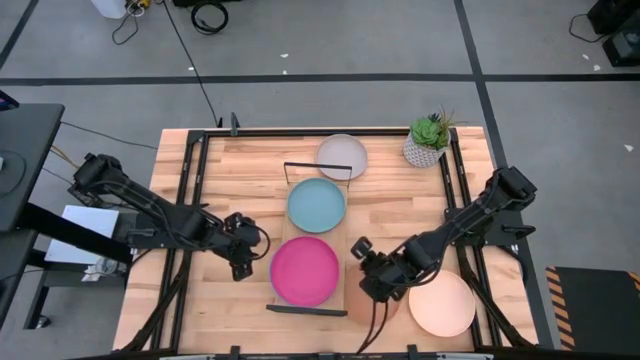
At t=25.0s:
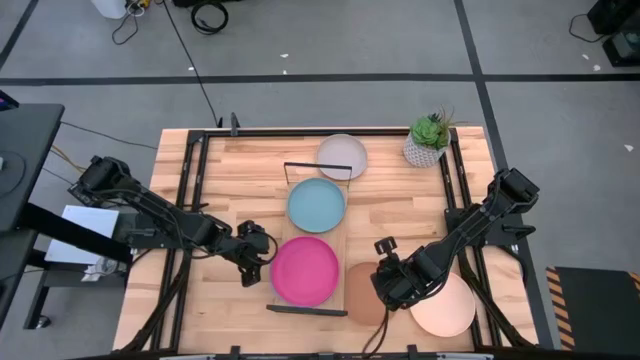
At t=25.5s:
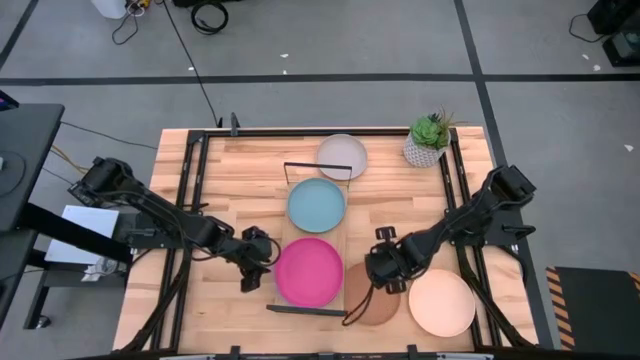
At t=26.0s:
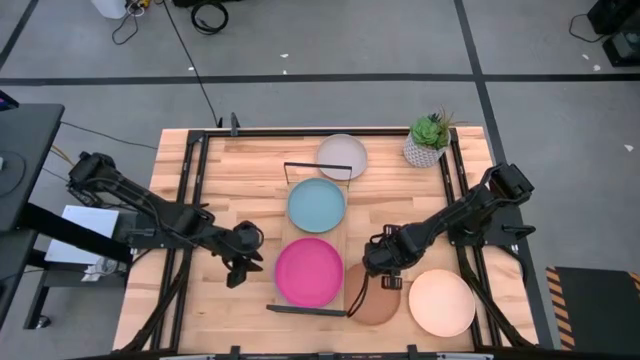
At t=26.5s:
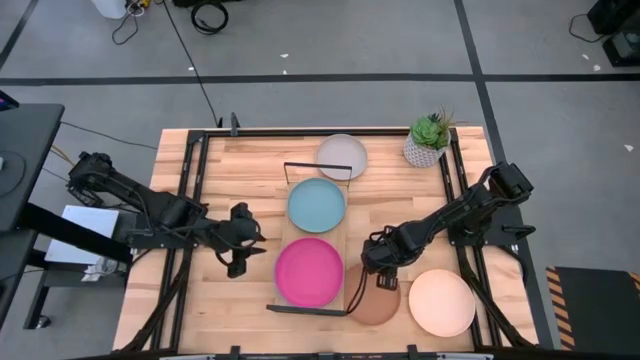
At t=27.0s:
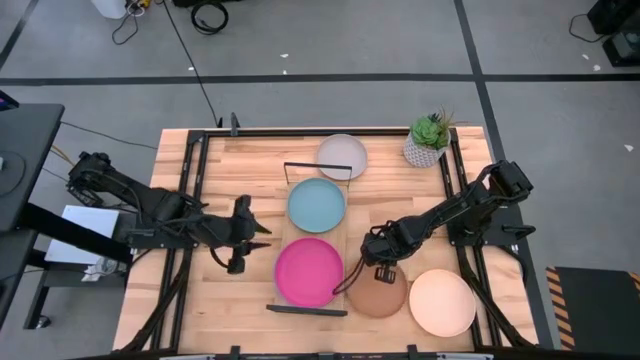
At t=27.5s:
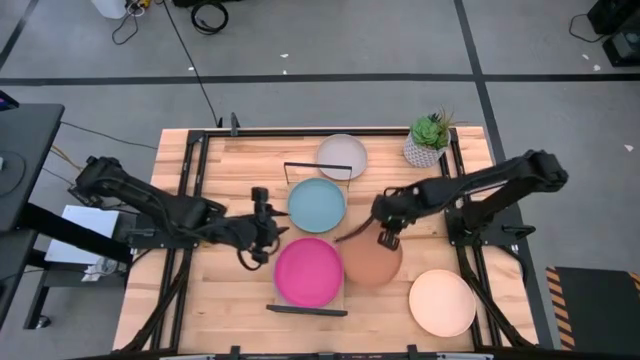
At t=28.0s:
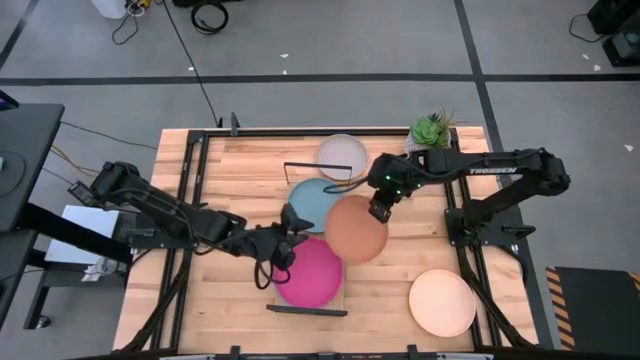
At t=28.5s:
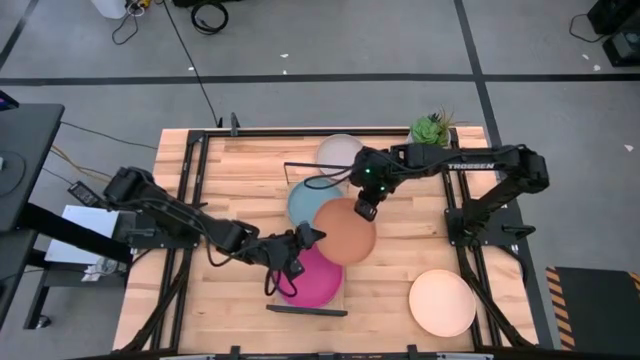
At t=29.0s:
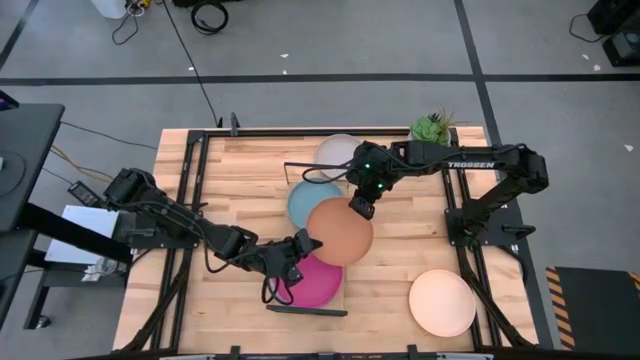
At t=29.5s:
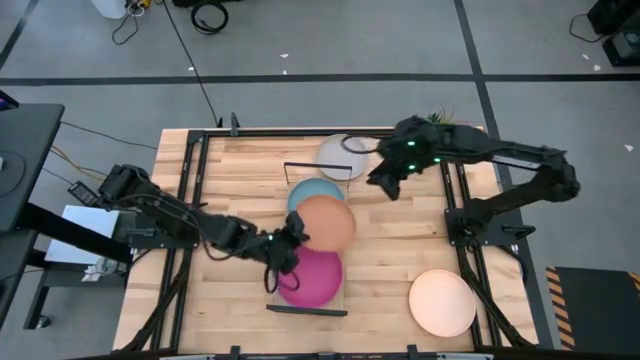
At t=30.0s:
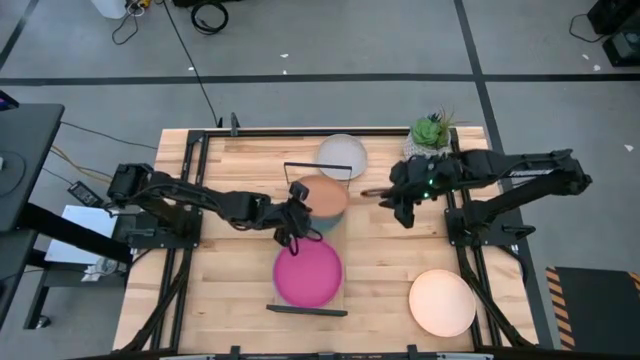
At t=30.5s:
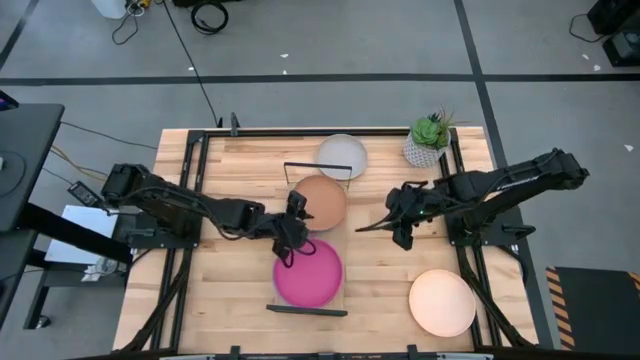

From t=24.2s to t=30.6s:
Task: Place and stack plates onto a shelf
Stack the brown plate on top of the light blue plate on the shelf

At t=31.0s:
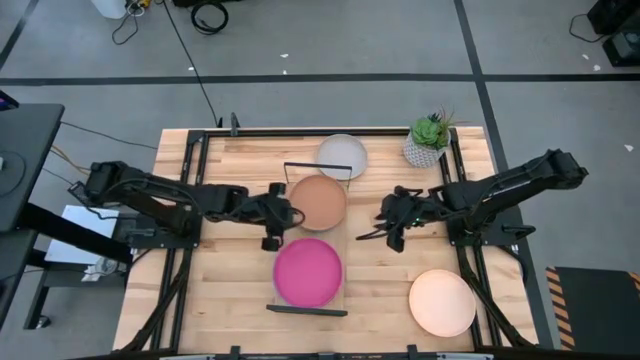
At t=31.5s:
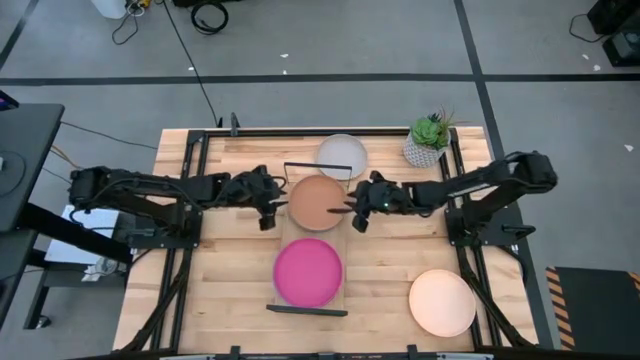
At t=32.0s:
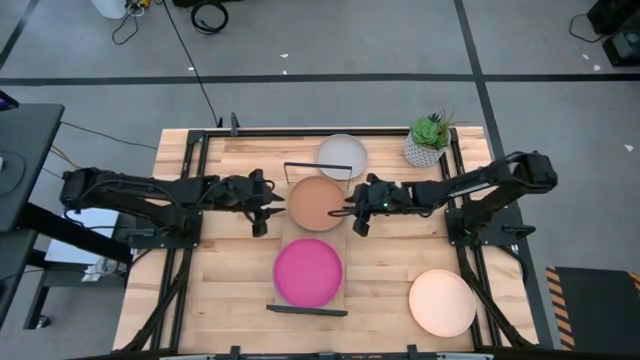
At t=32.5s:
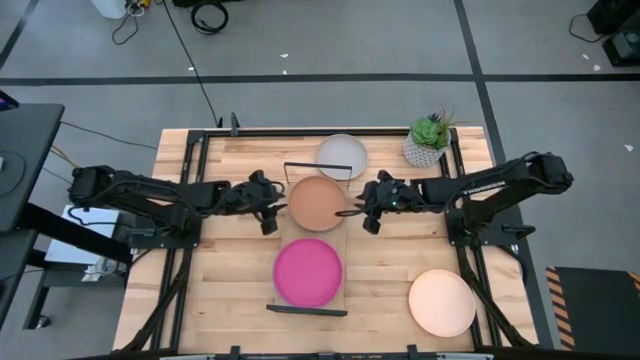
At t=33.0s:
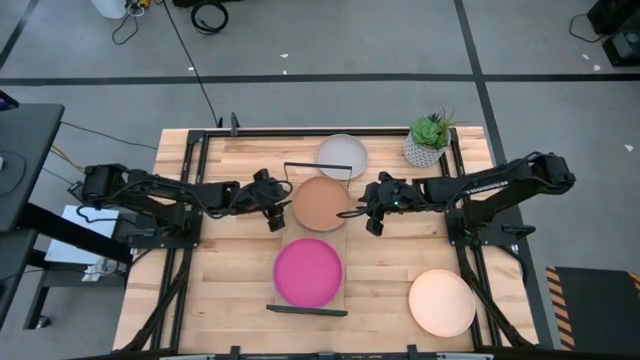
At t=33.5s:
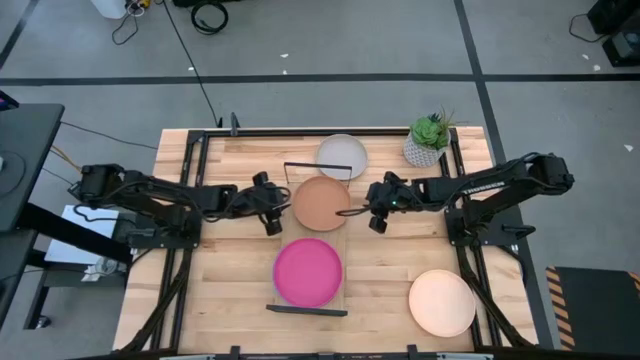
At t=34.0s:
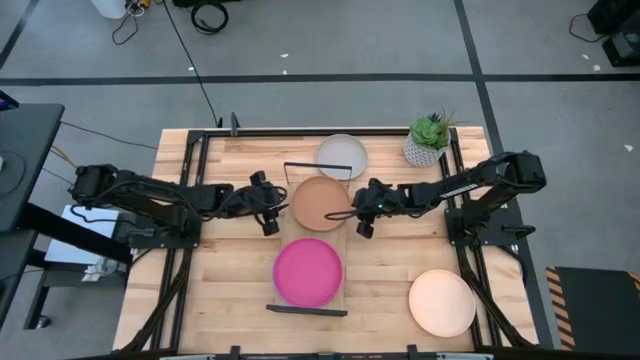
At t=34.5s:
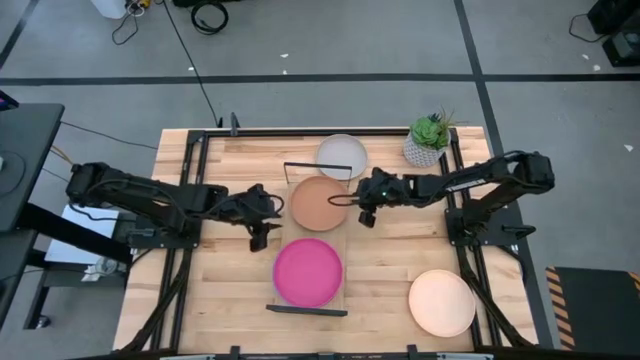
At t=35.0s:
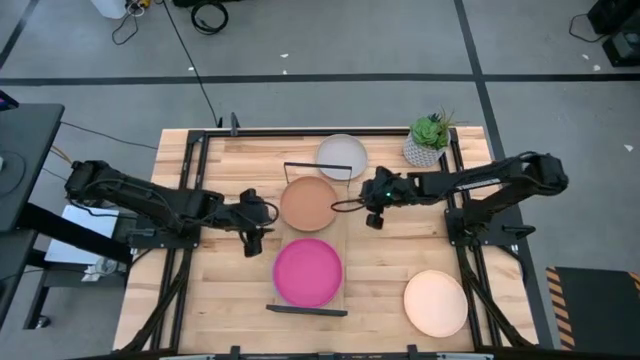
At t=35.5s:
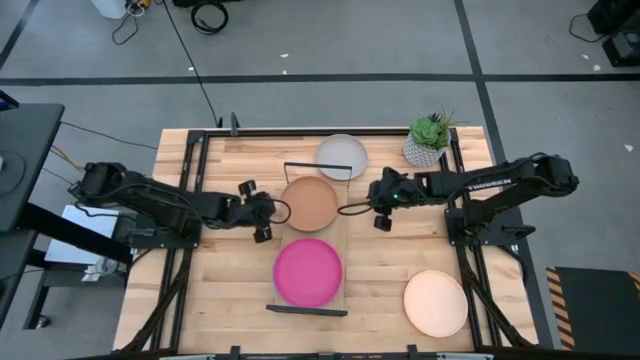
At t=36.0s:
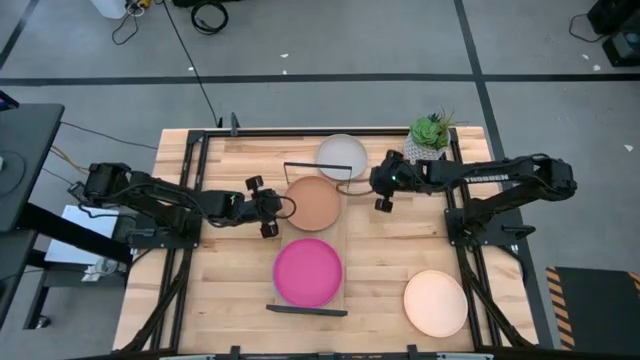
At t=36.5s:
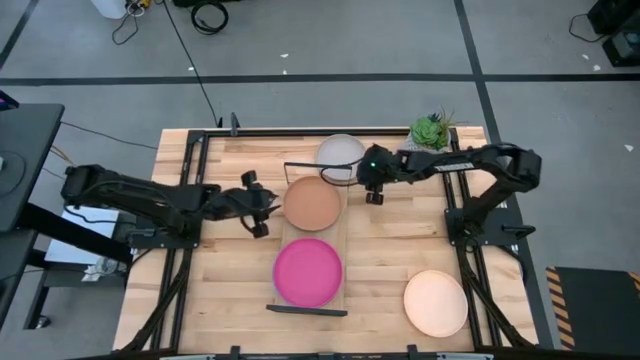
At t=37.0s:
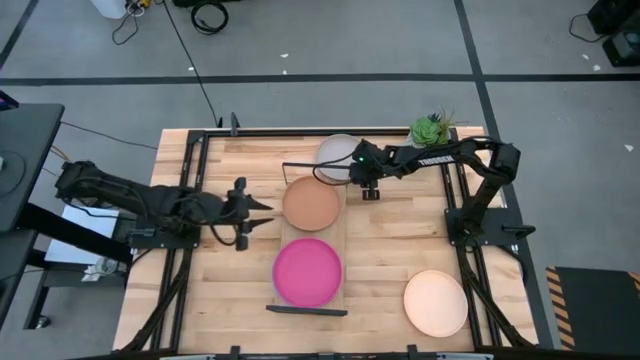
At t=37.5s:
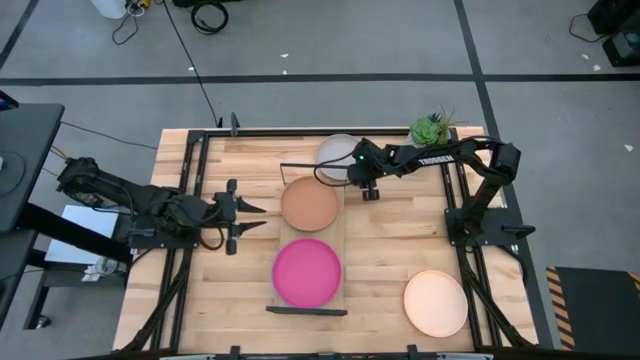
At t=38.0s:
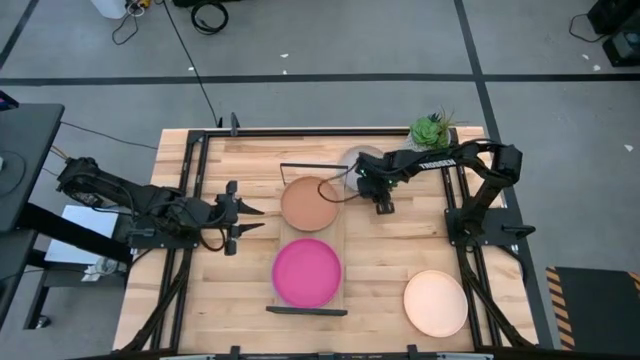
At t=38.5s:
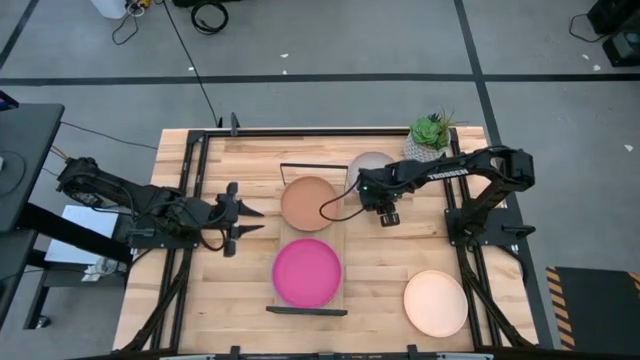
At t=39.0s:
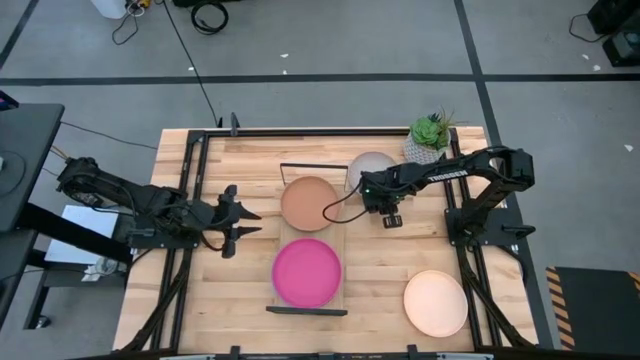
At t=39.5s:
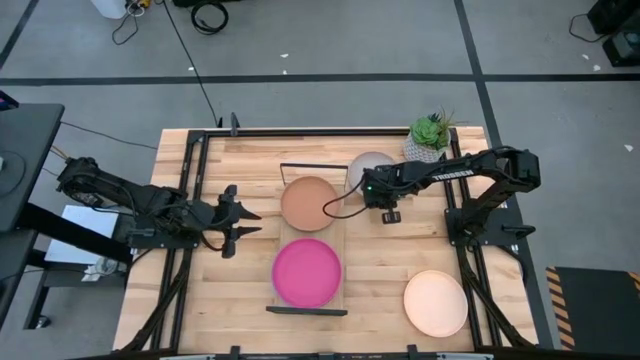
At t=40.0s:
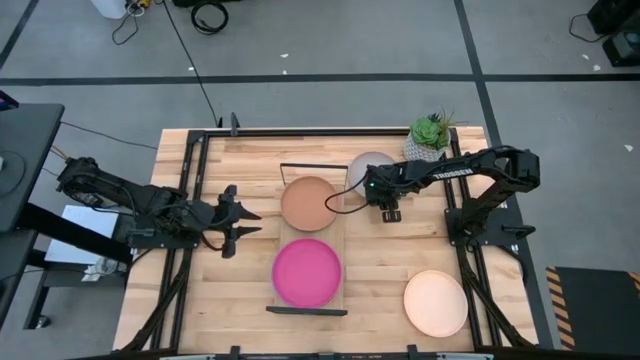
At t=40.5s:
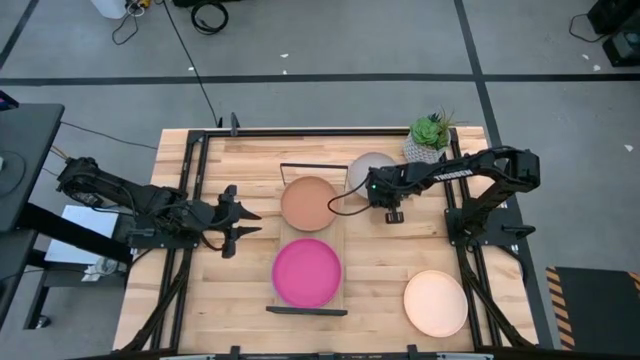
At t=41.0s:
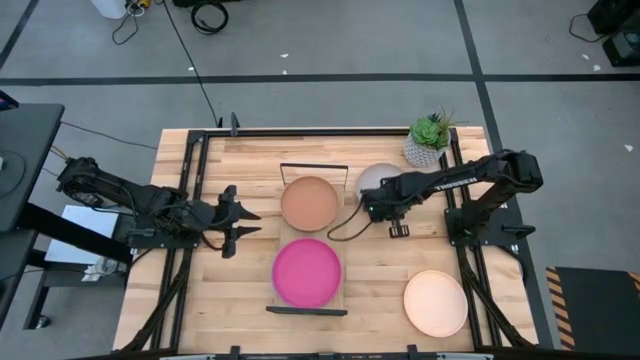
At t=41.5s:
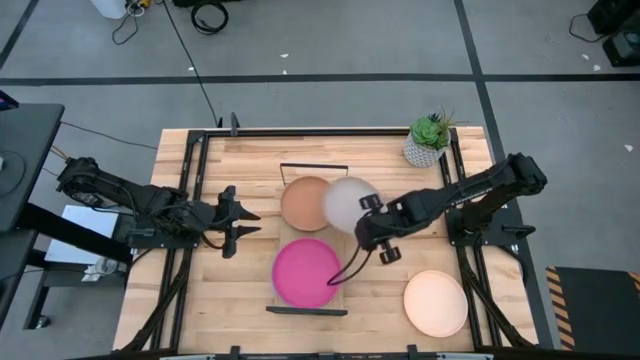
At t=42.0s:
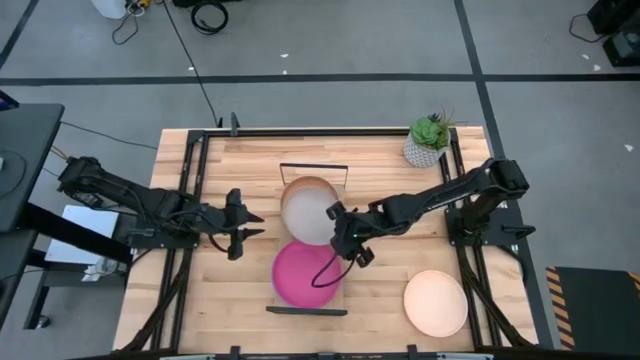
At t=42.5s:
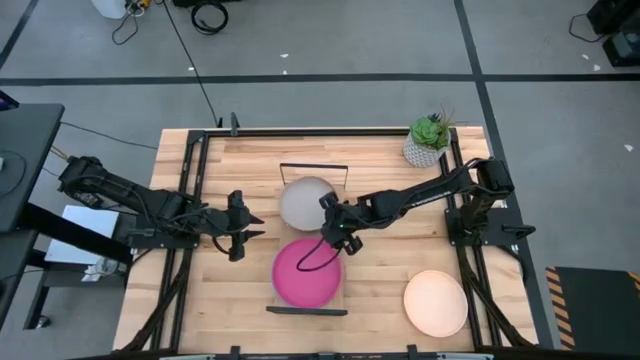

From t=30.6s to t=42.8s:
Stack the gray plate on top of the brown plate on the shelf

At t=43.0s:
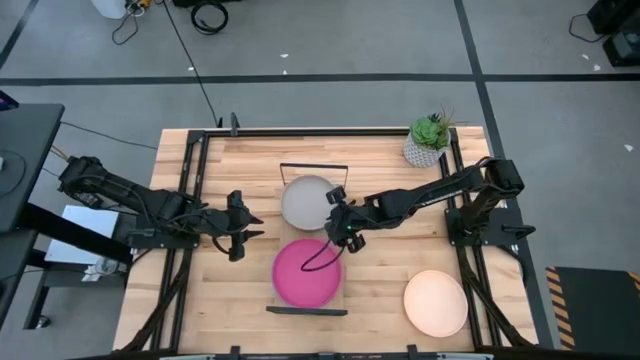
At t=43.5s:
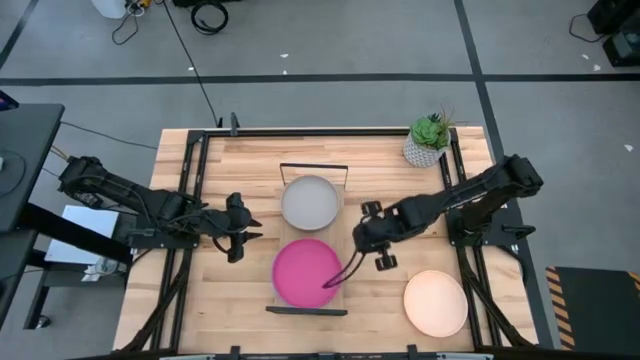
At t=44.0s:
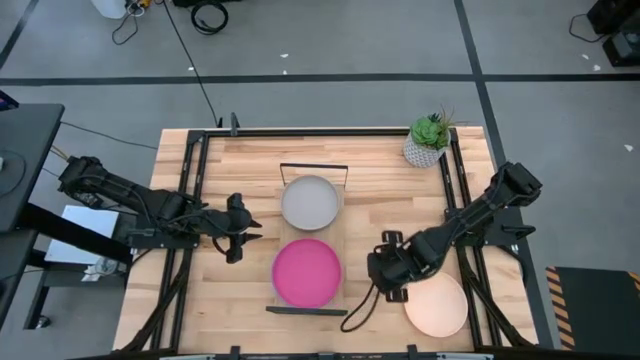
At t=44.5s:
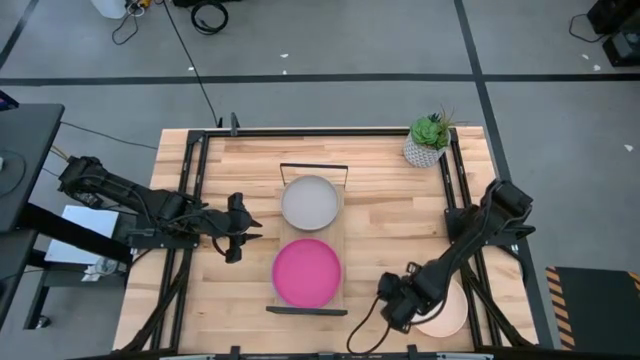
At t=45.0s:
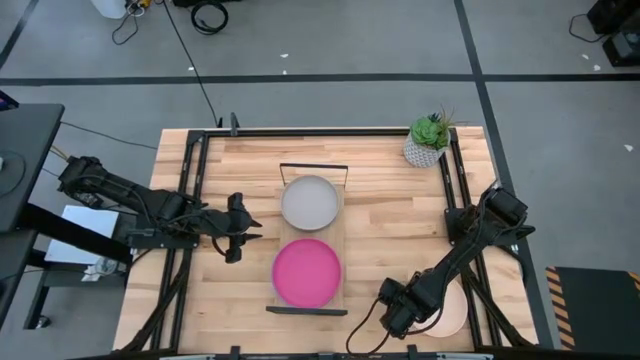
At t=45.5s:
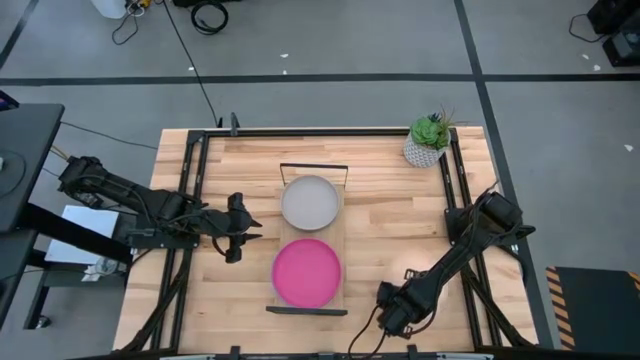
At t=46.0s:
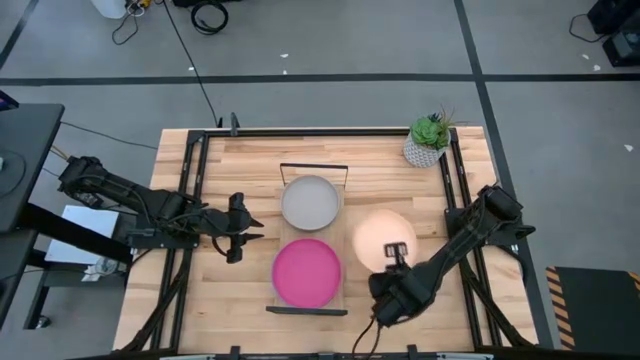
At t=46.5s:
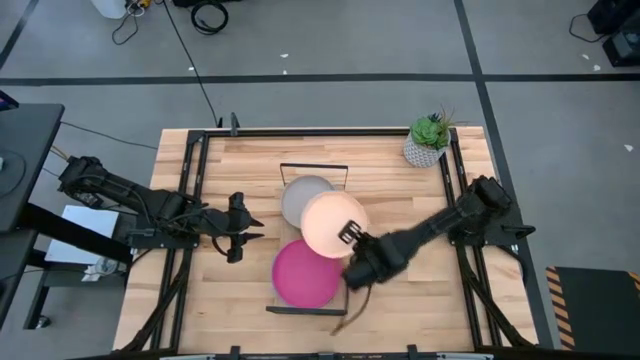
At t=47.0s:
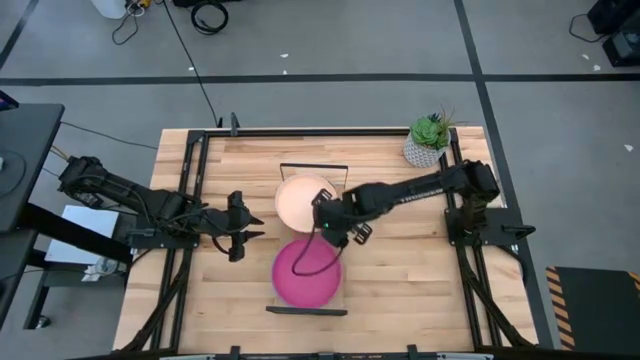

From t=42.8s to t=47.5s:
Stack the light orange plate on top of the gray plate on the shelf
